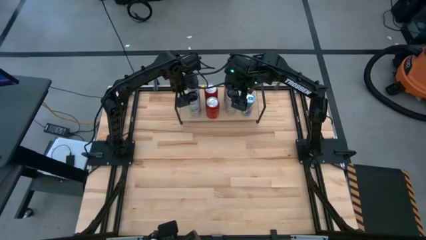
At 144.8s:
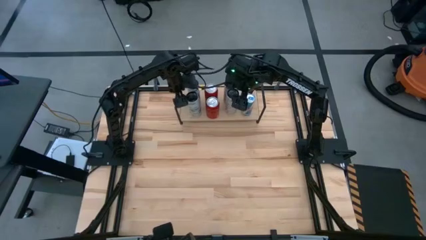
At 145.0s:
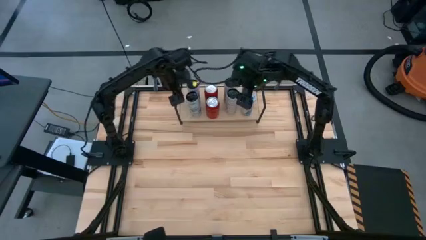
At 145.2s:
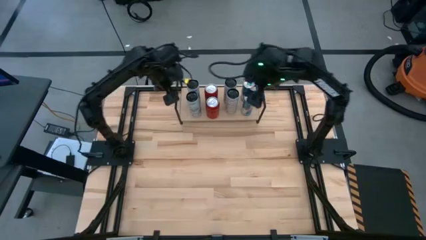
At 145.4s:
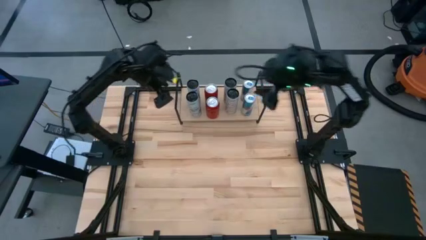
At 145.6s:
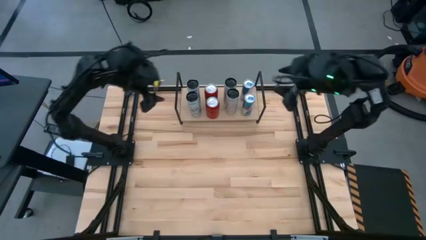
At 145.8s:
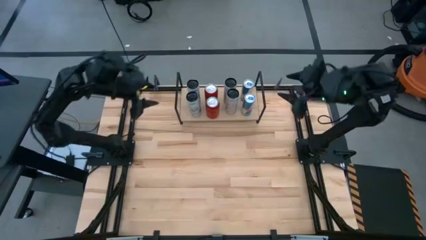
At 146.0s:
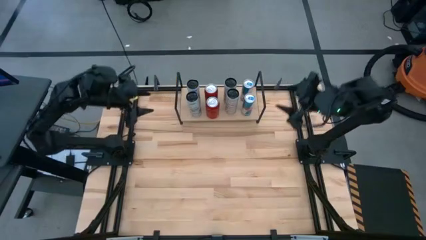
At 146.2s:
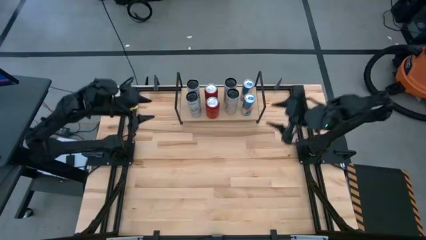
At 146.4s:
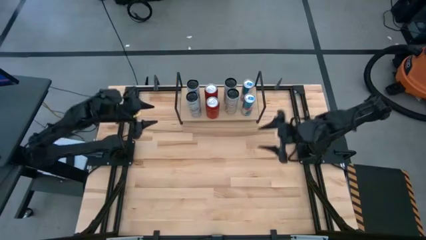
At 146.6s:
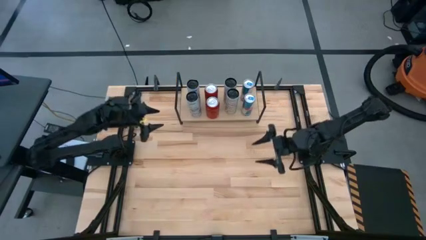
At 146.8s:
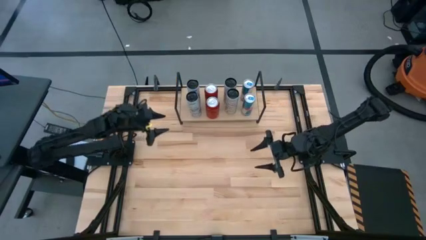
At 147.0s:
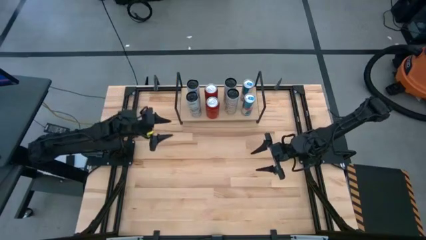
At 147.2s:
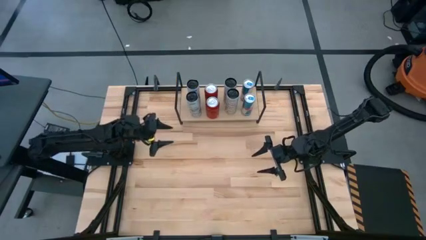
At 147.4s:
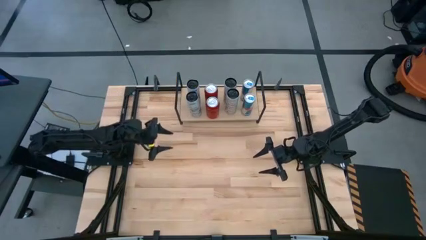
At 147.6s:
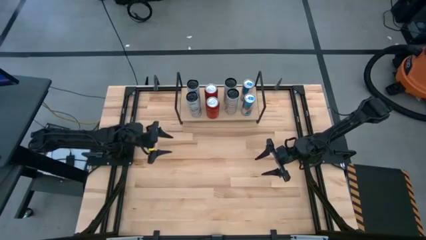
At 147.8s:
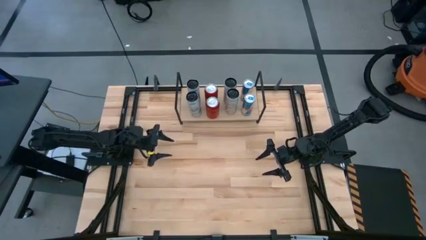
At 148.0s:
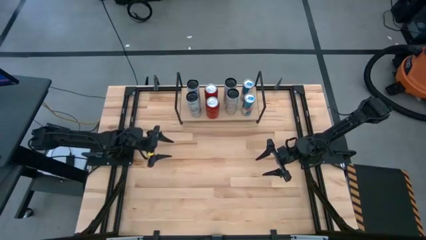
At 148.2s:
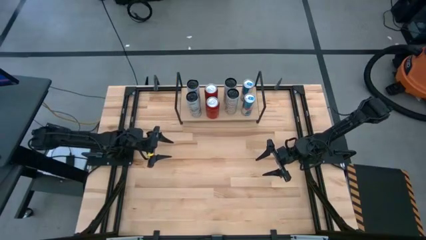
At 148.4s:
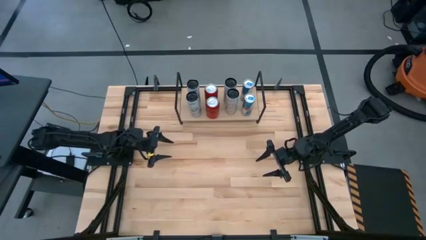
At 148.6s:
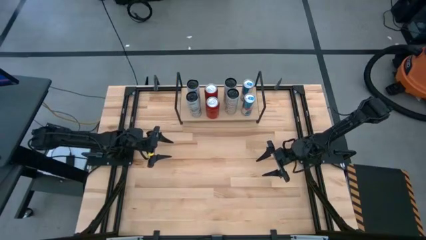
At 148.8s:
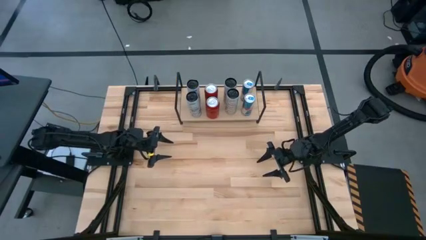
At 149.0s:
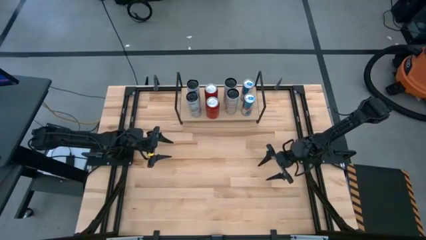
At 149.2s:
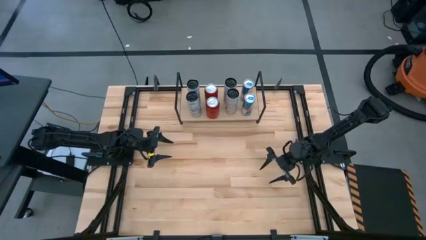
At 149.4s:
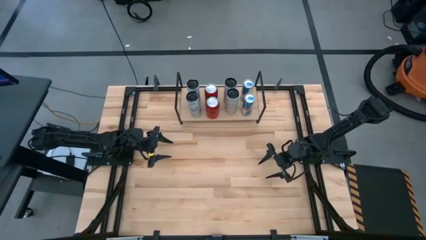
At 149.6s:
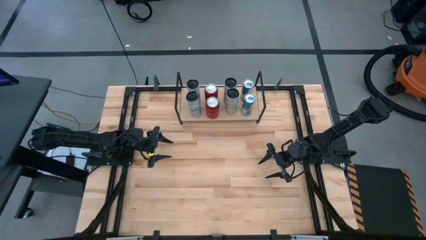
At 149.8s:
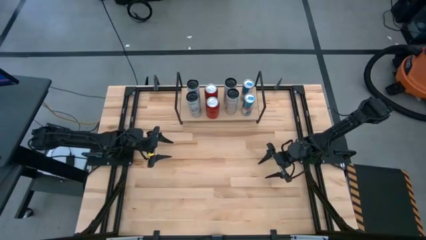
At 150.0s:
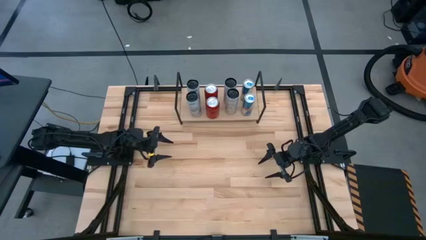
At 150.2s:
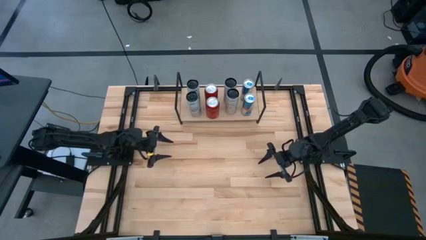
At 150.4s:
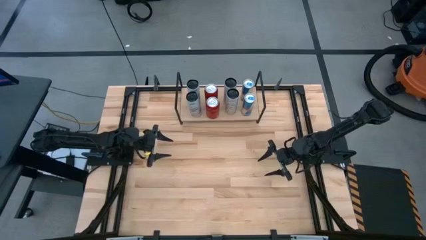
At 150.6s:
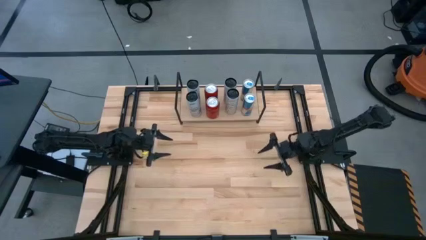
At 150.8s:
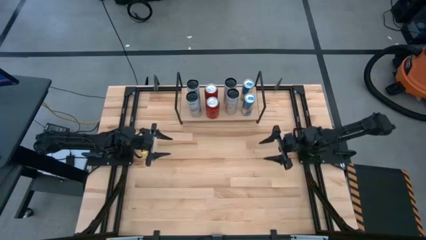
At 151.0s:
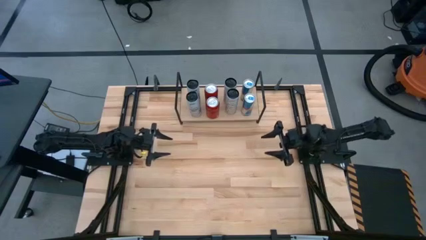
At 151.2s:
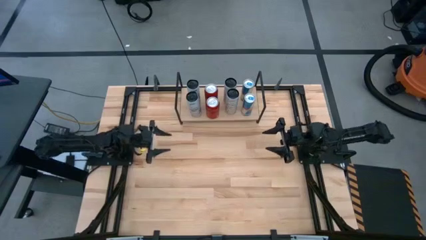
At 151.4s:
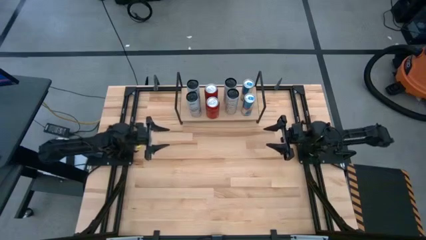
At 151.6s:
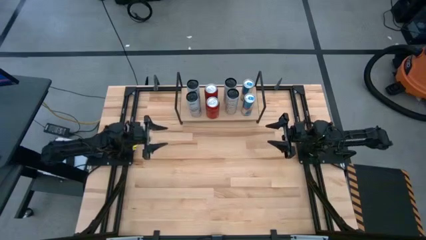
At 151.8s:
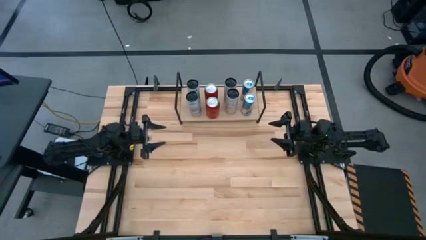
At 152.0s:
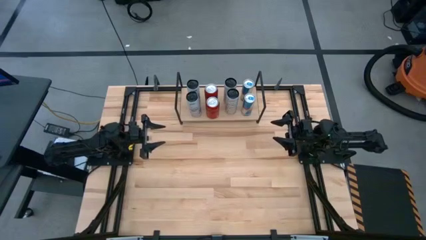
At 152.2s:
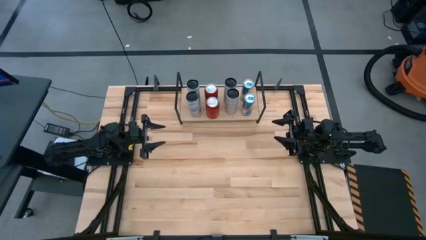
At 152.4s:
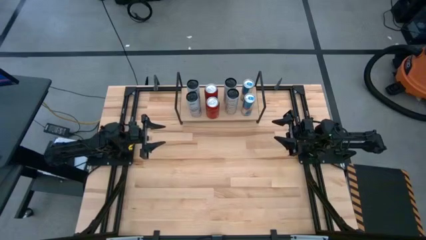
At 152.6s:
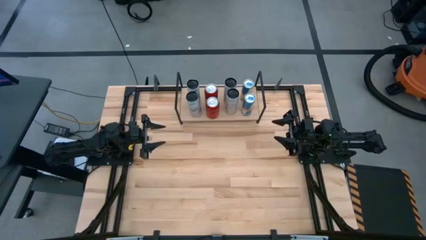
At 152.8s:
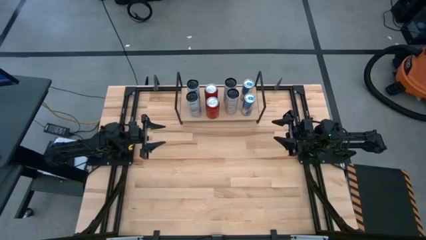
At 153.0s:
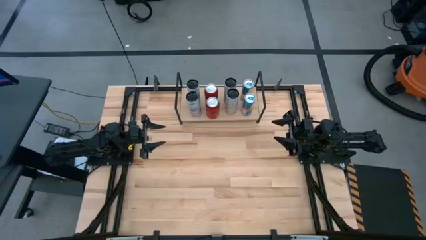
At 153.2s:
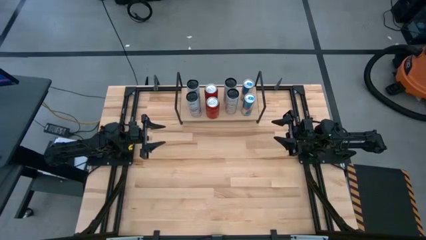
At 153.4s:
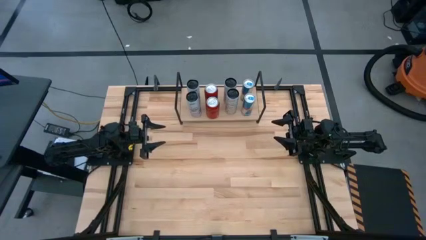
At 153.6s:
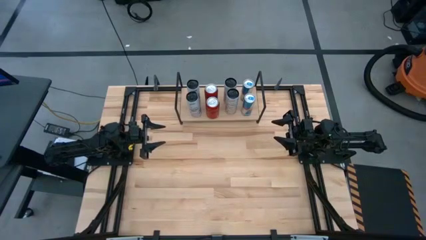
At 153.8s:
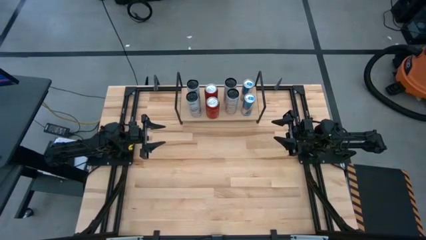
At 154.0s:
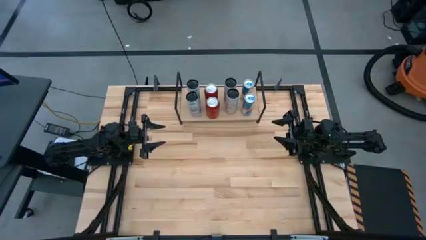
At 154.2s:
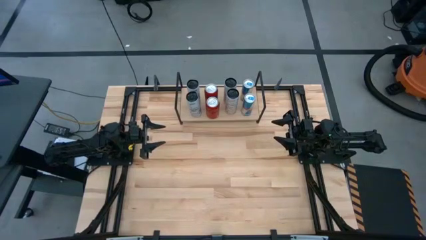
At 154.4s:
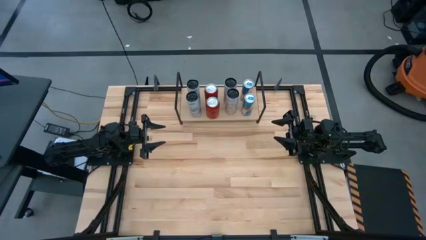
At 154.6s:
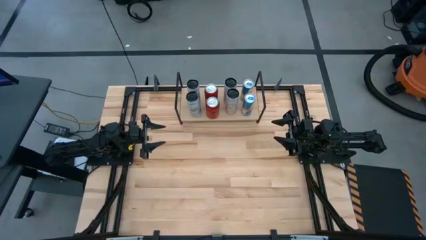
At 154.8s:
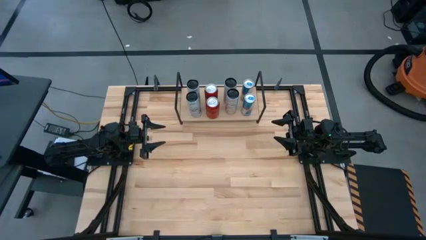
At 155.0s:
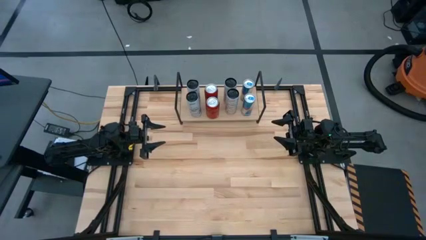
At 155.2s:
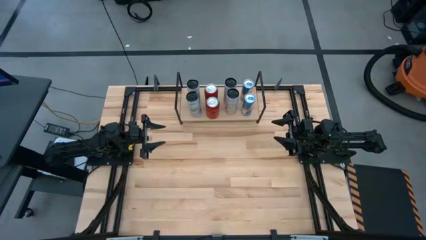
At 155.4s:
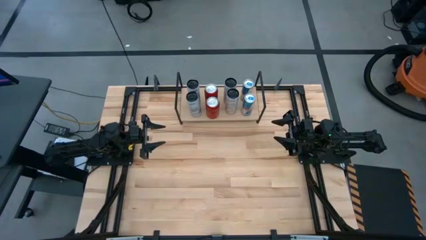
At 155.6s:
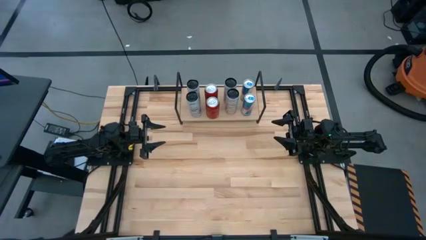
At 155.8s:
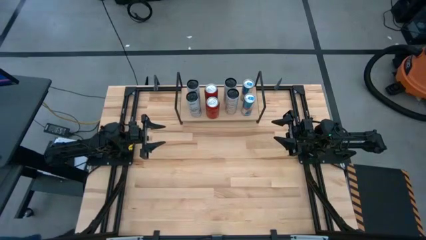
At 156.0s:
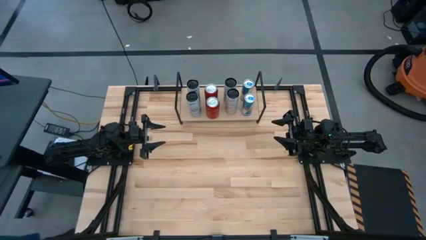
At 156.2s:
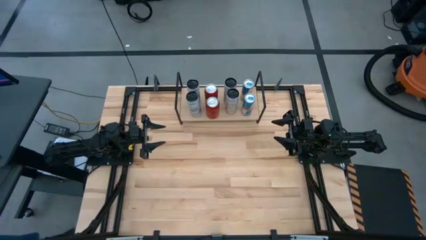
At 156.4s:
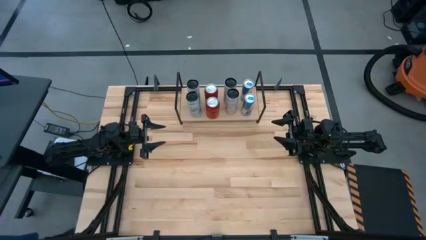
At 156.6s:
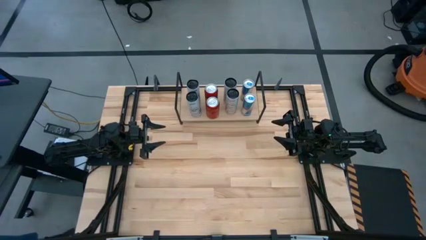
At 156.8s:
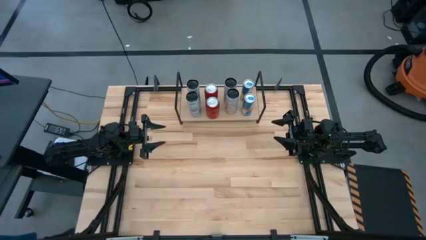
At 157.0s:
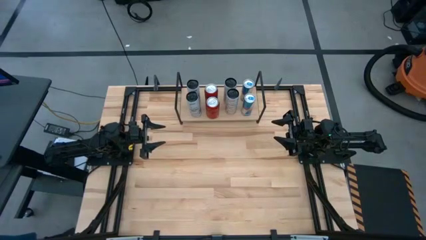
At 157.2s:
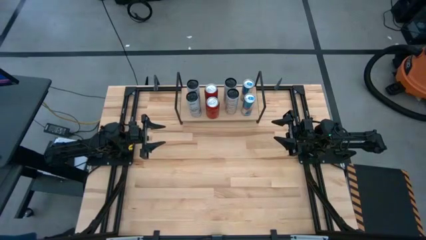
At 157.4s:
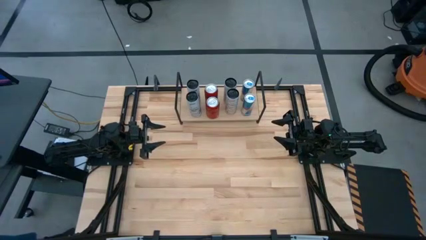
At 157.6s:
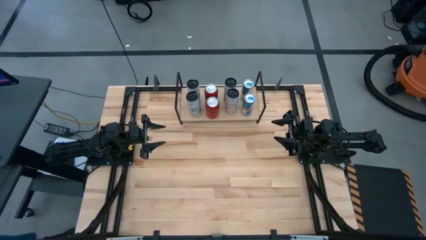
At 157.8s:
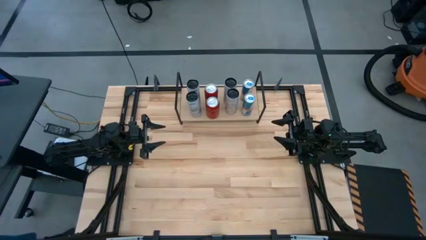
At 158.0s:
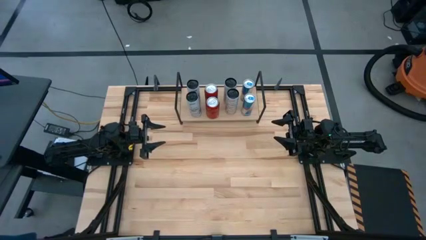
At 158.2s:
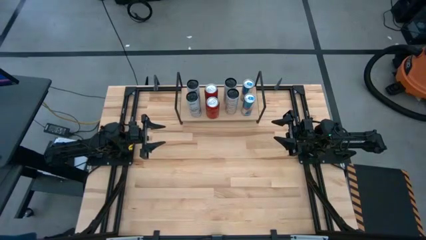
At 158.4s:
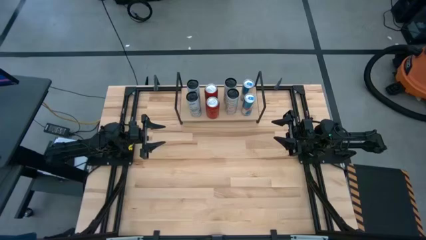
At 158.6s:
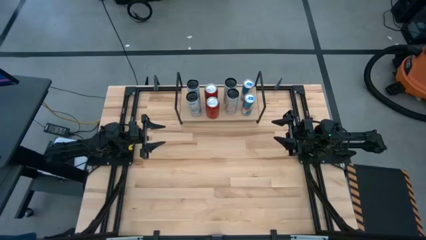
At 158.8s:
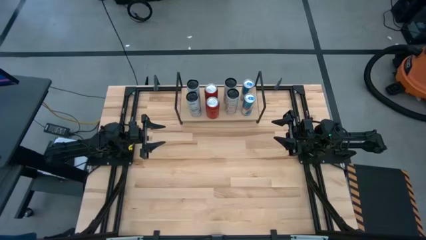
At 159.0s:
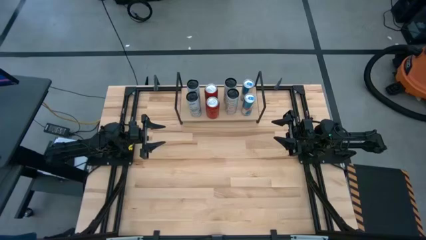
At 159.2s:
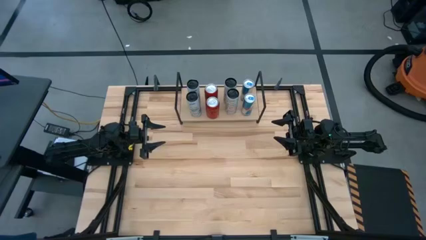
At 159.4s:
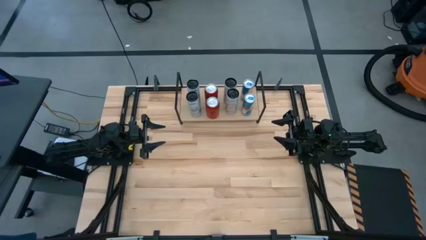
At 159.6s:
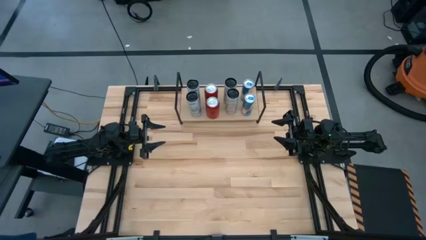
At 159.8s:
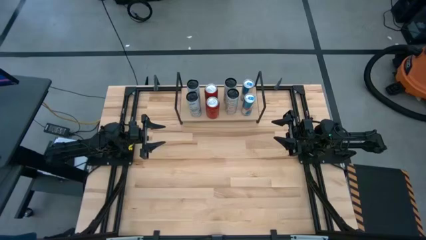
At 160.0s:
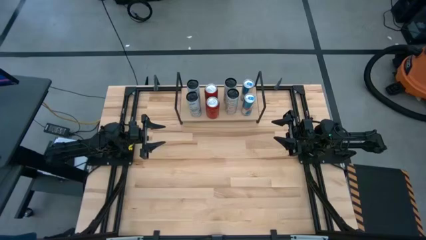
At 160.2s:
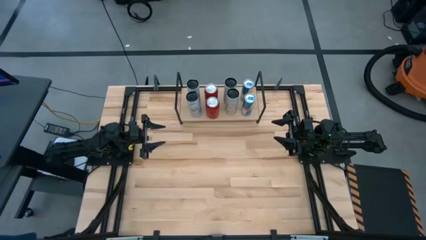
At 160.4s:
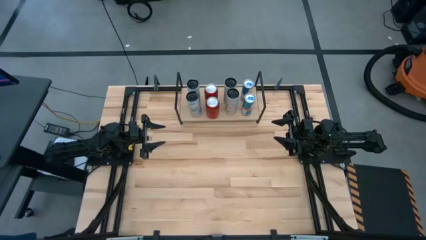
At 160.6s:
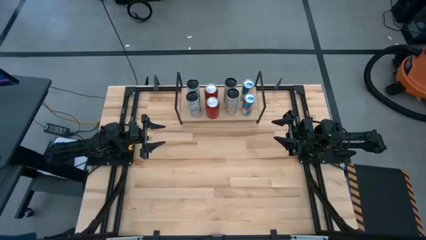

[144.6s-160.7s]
Task: Place canned beverage on shelf
Return to Home Position
